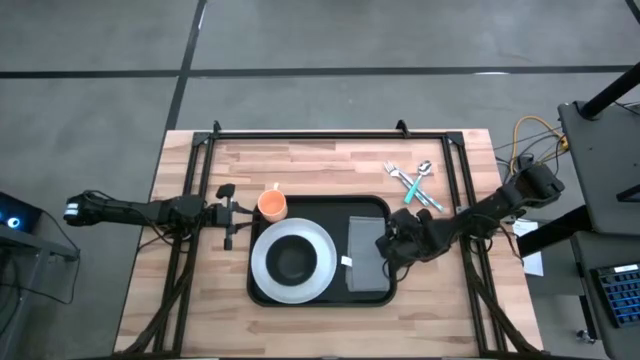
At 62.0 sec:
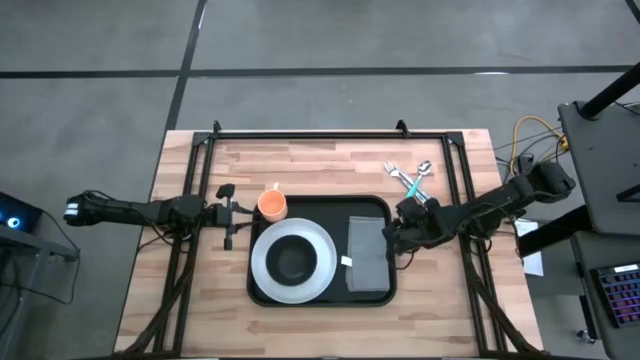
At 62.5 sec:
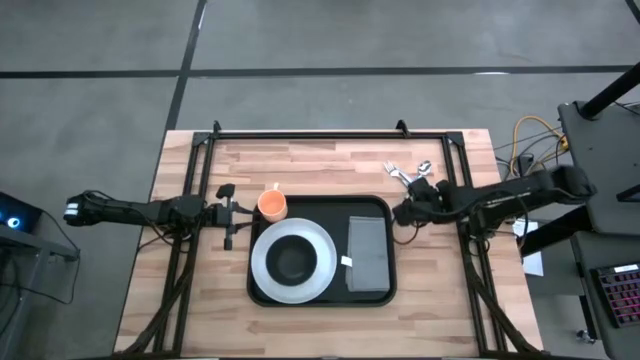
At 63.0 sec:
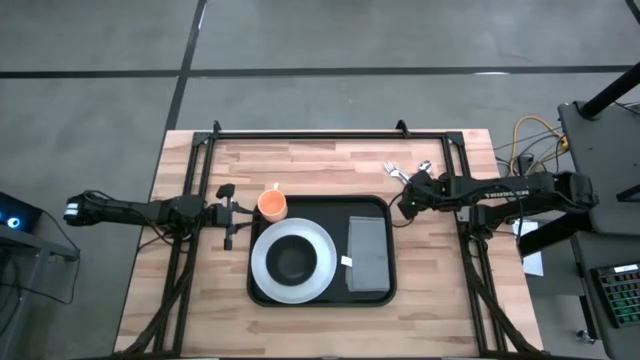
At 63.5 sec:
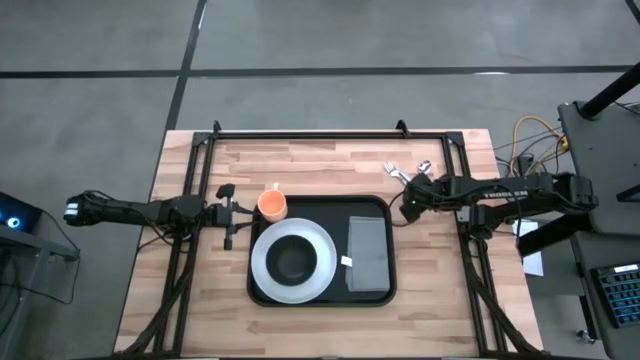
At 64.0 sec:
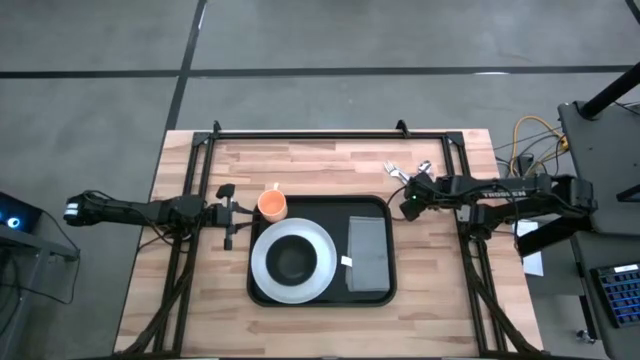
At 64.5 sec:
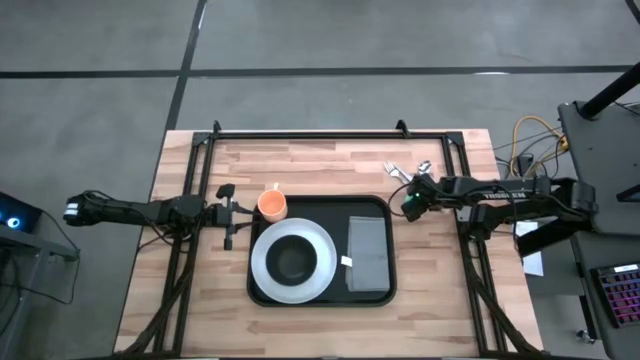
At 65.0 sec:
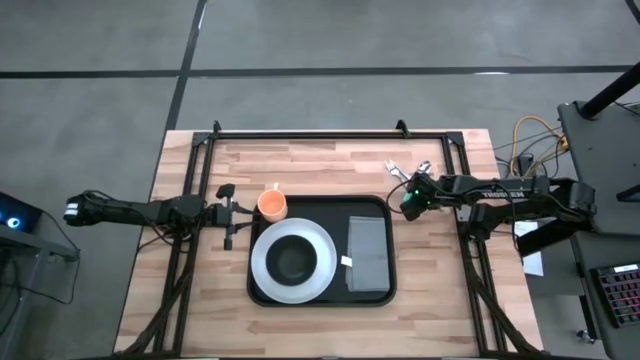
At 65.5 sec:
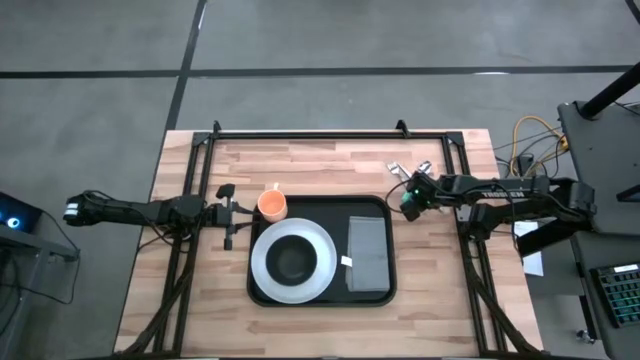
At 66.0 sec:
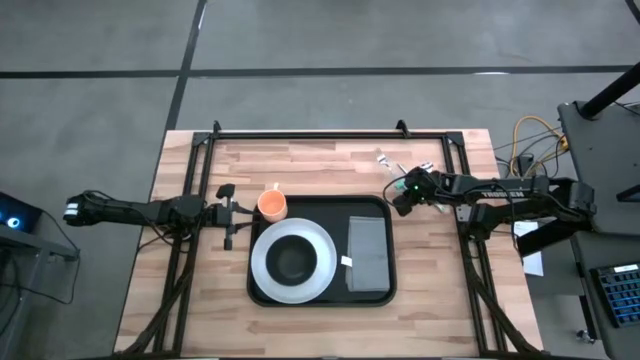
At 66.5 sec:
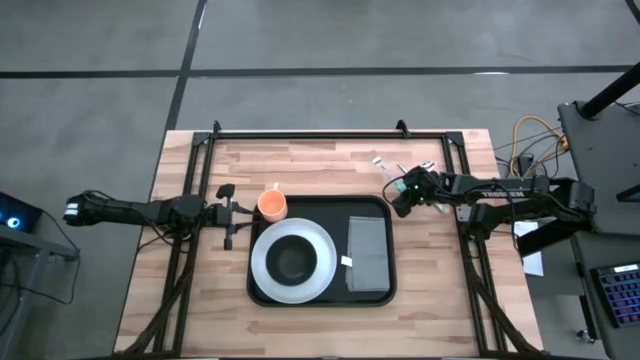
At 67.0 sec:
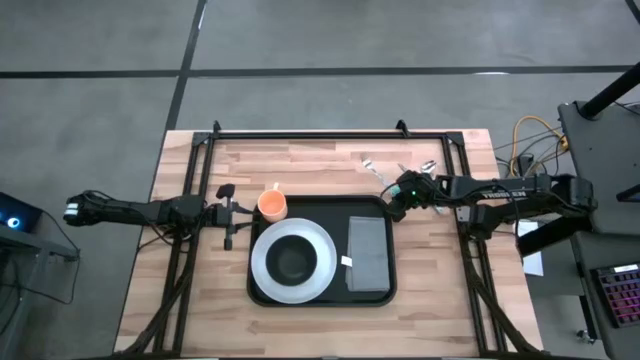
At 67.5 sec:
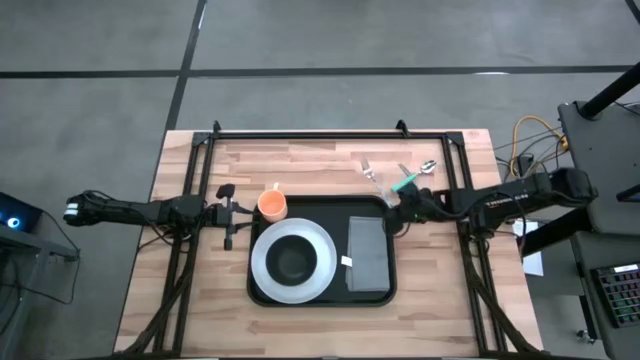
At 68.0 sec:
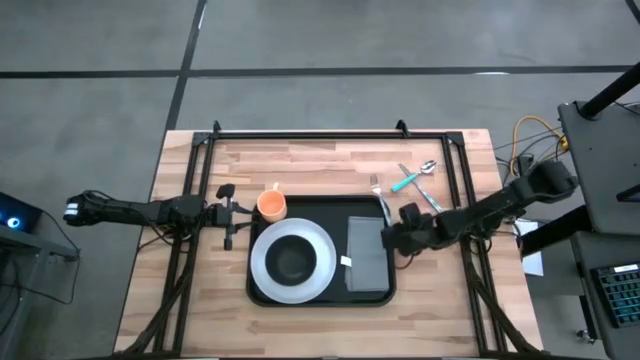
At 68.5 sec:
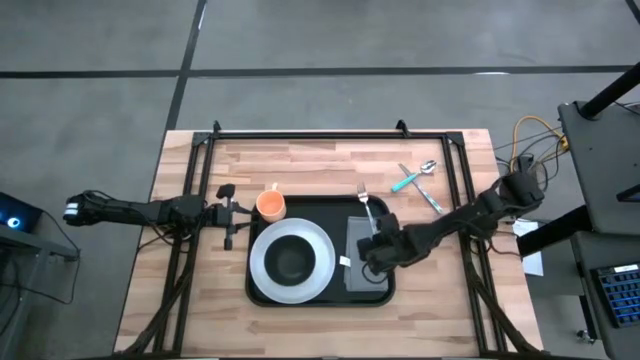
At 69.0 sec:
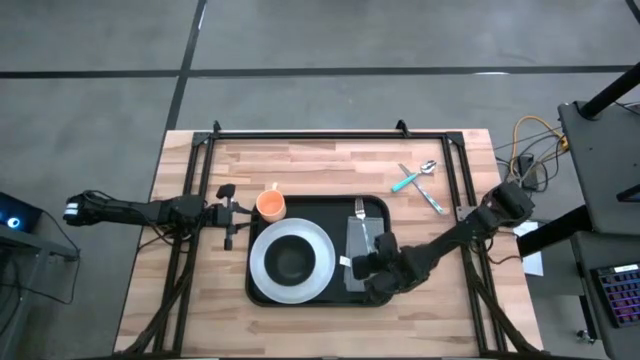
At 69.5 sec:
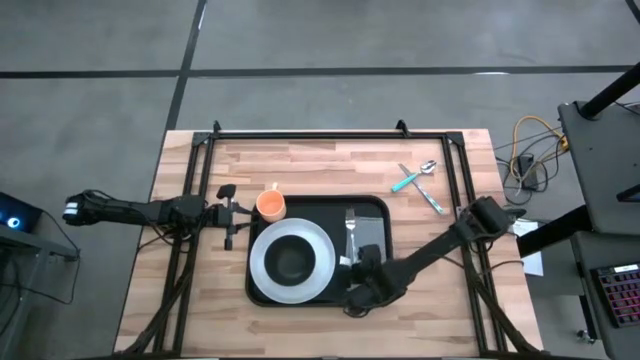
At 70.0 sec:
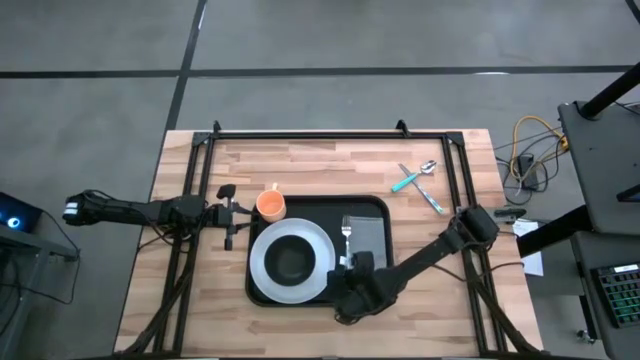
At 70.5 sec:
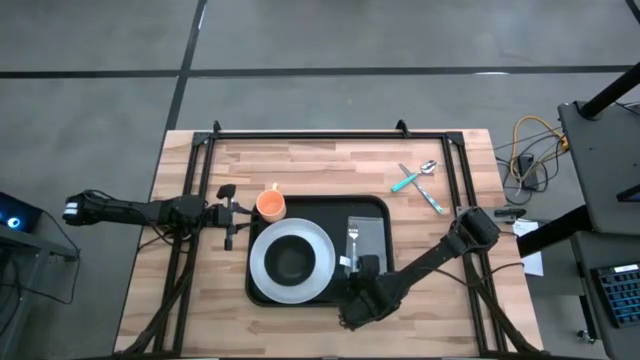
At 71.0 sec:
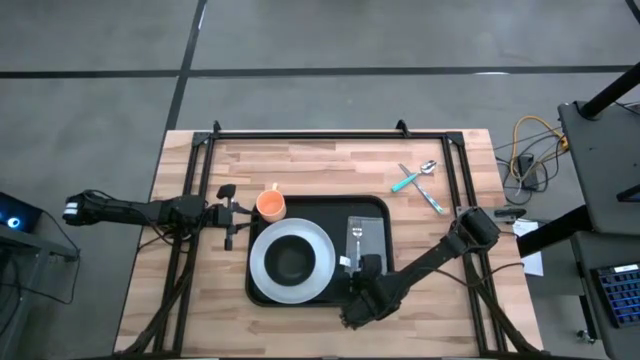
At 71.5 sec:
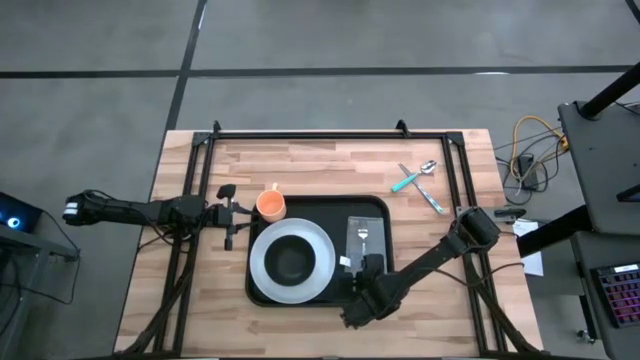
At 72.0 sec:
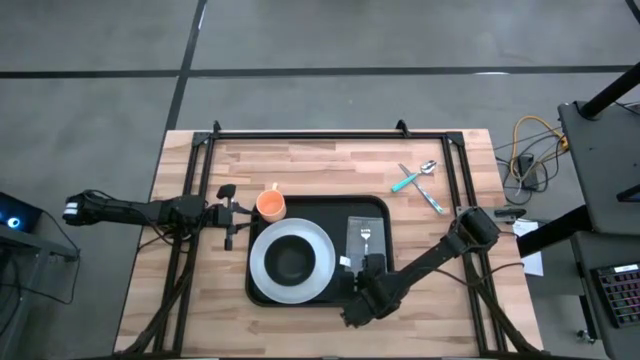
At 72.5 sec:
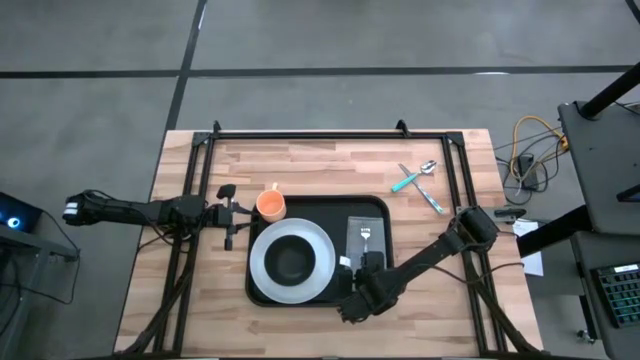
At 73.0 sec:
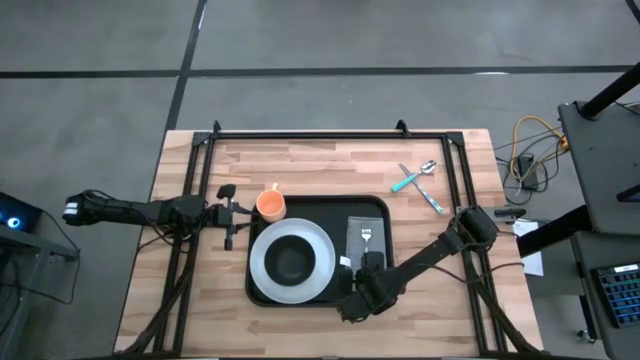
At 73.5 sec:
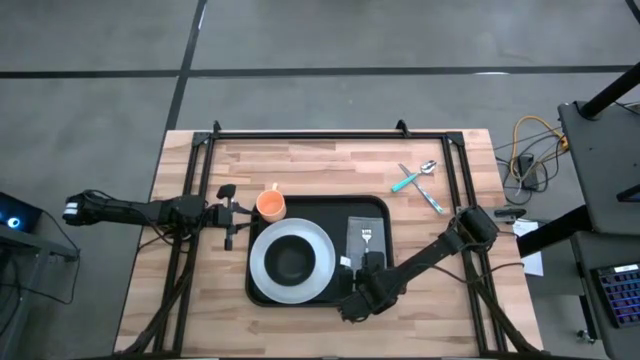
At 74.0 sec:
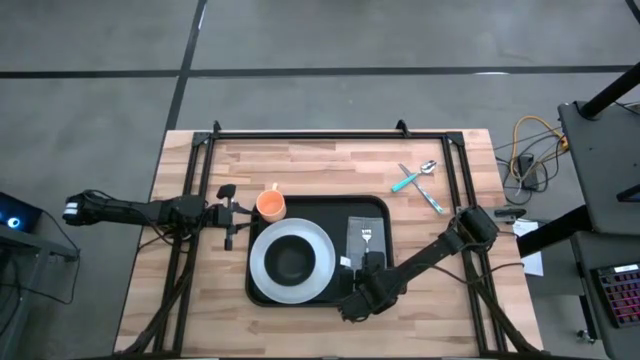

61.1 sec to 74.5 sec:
Task: Set up tray
Put the blue fork in the middle of the gray napkin

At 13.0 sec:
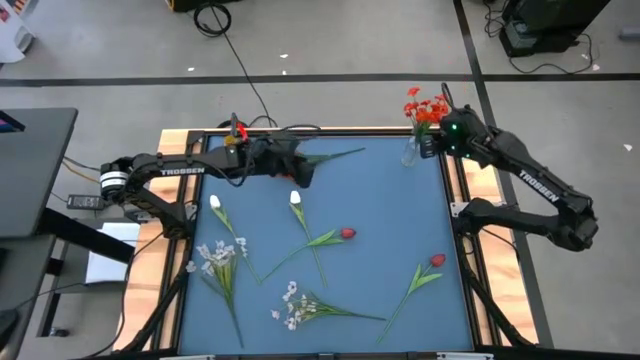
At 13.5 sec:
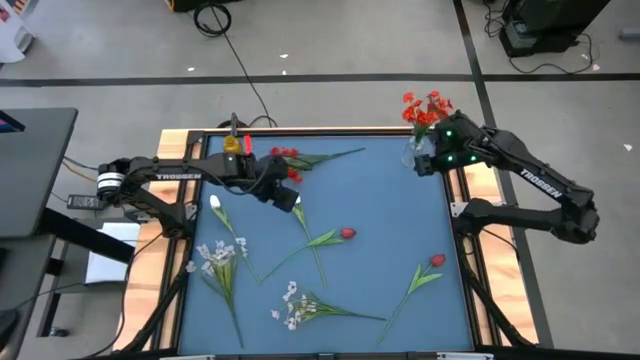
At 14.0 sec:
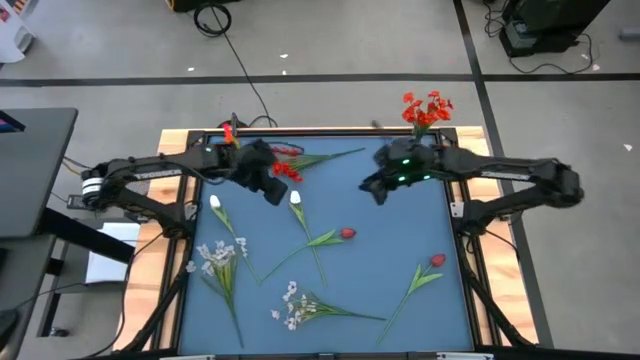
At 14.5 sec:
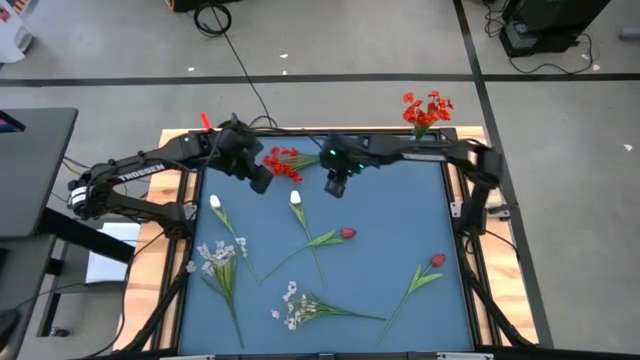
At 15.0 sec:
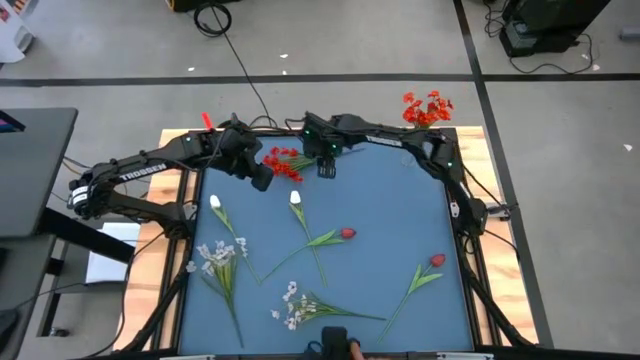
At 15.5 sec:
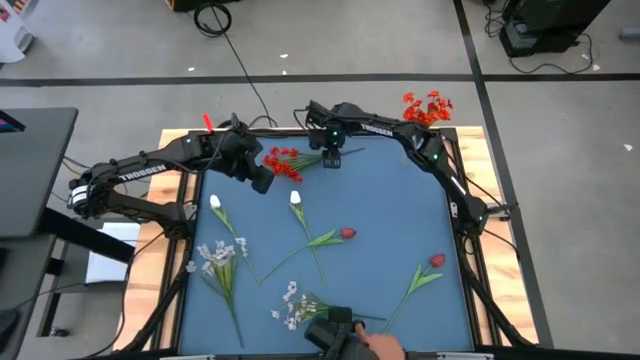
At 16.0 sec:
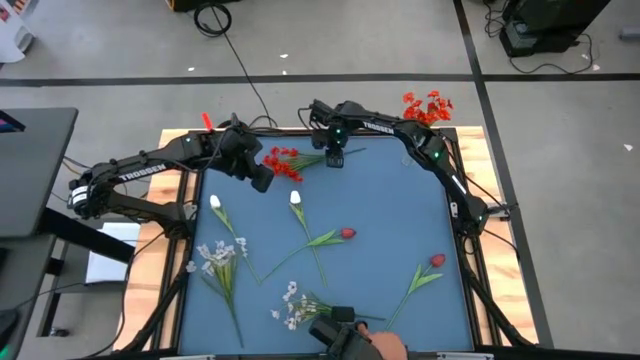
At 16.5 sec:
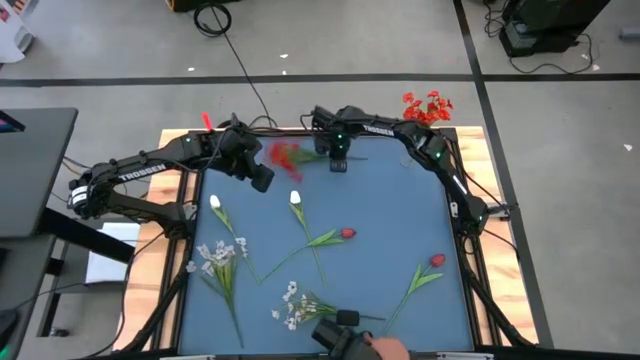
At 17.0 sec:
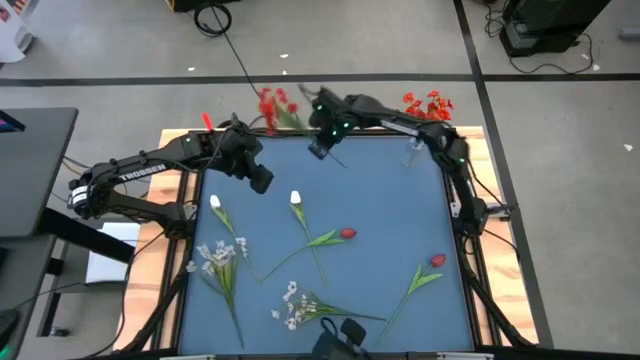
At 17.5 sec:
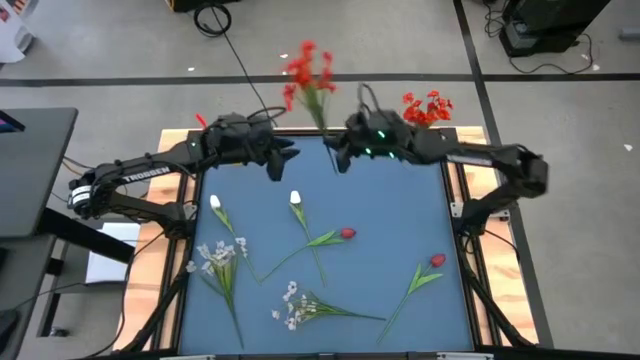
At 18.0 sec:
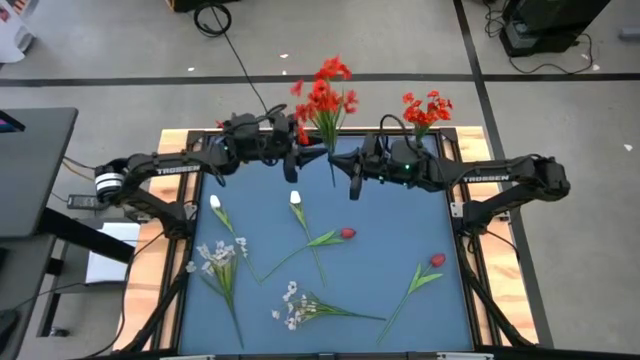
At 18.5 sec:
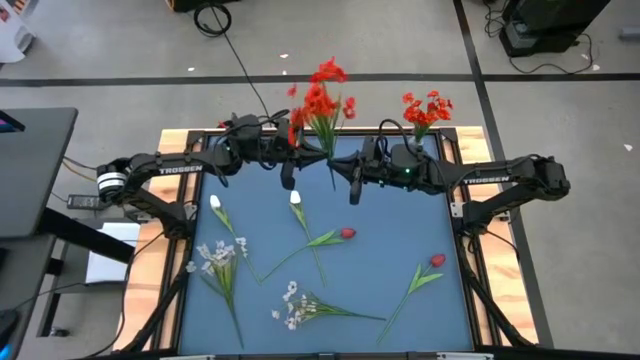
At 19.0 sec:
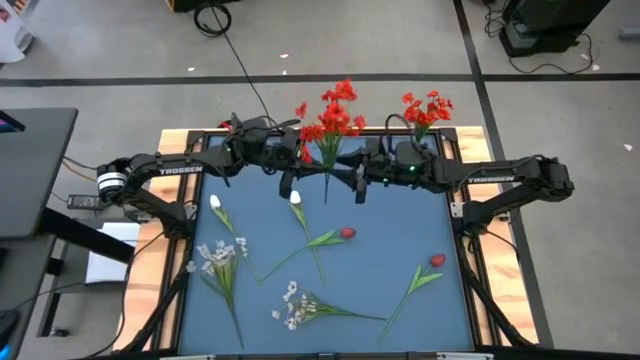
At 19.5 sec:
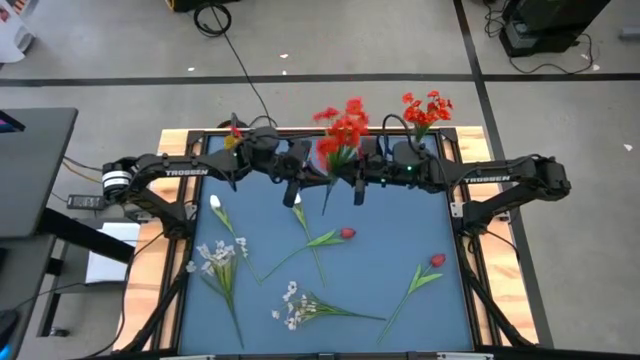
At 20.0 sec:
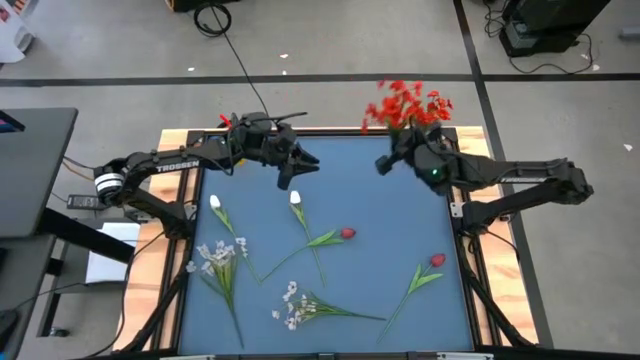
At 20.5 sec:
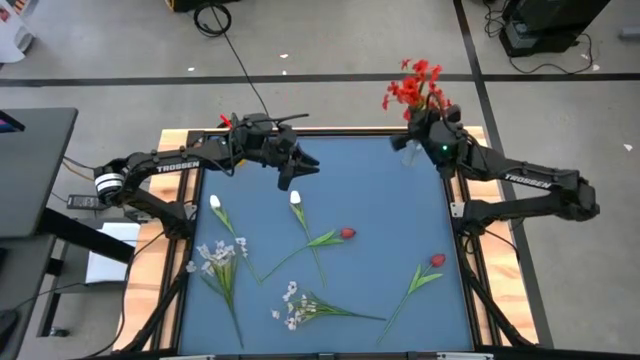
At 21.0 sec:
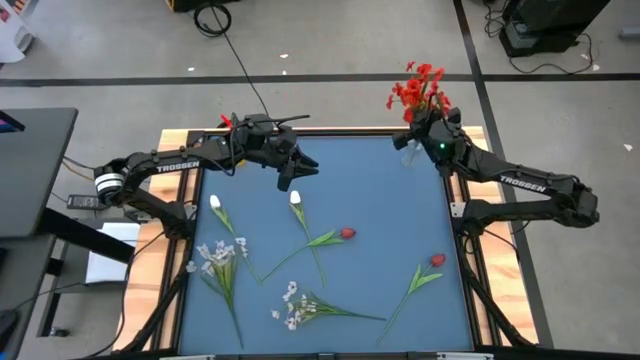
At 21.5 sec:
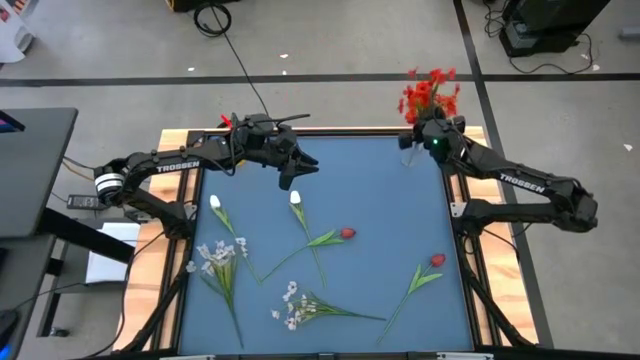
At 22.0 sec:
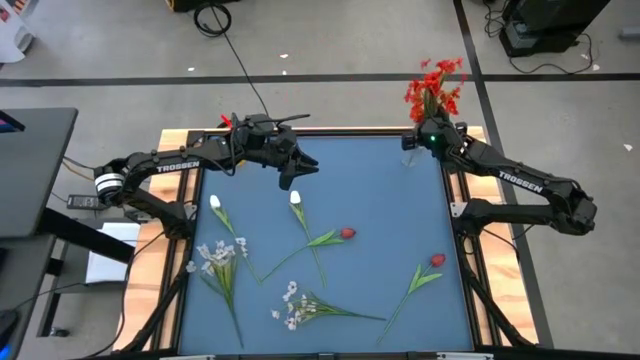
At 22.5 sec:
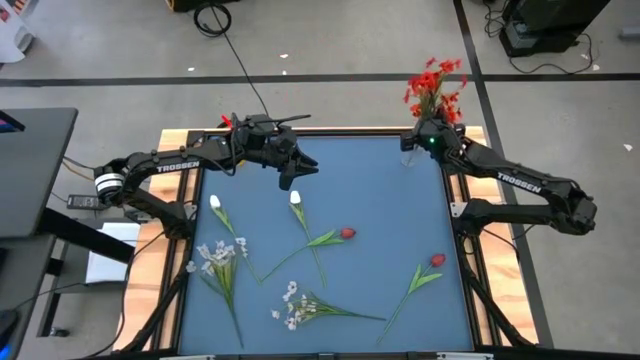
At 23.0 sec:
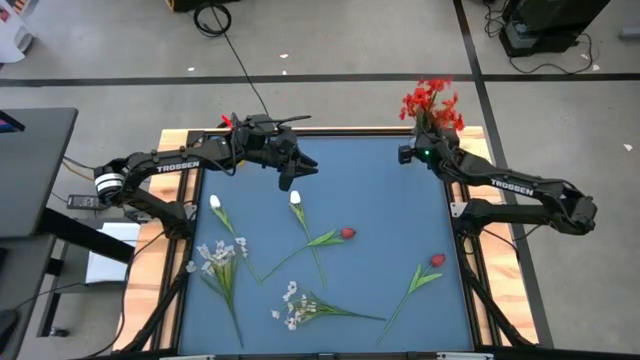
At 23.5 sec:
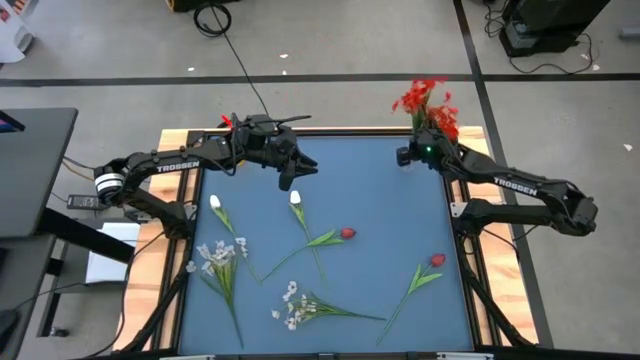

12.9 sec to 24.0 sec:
Task: Sort flowers into vase by color
Put the orange flowers into the transparent vase
